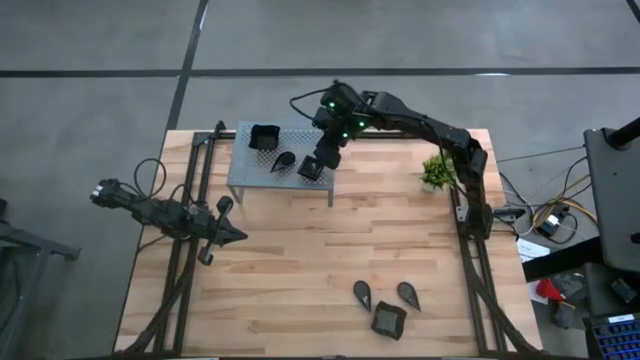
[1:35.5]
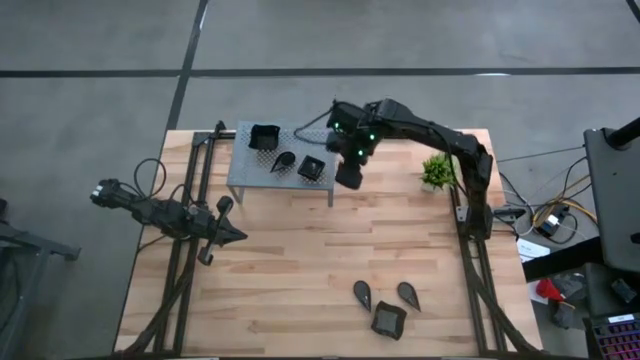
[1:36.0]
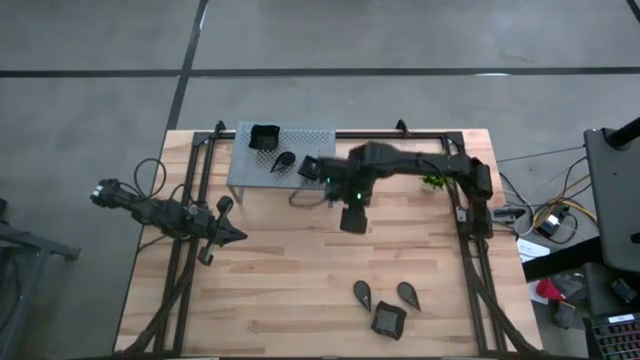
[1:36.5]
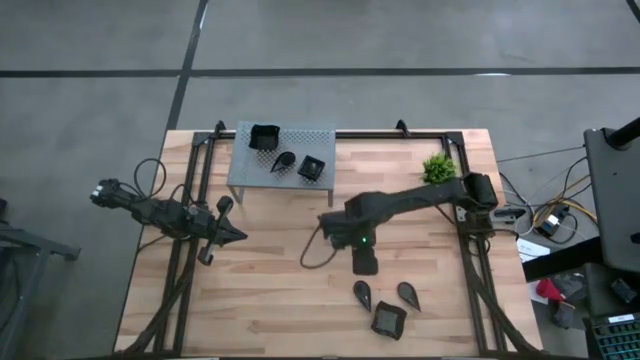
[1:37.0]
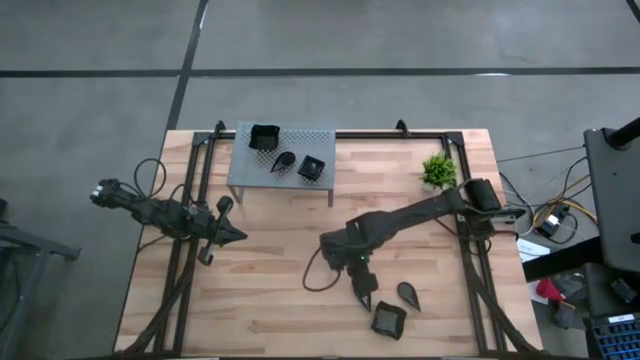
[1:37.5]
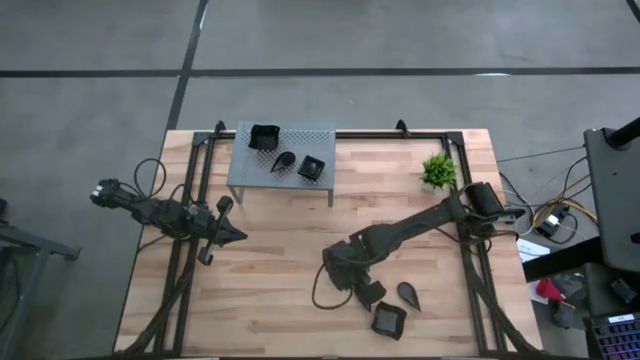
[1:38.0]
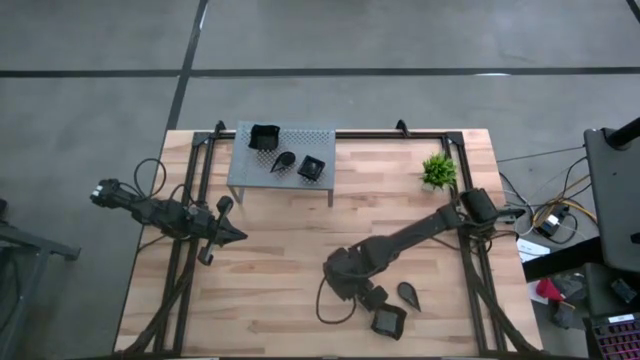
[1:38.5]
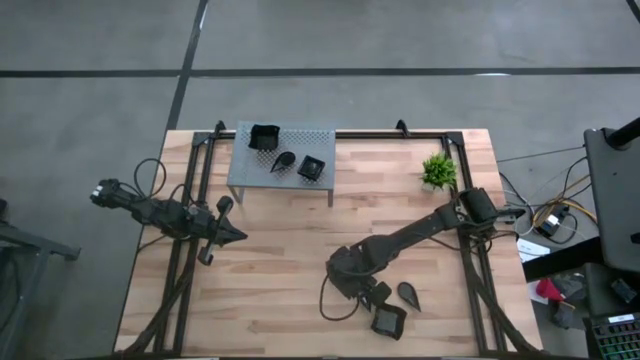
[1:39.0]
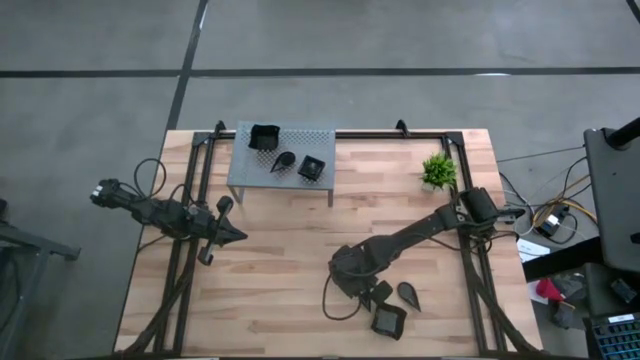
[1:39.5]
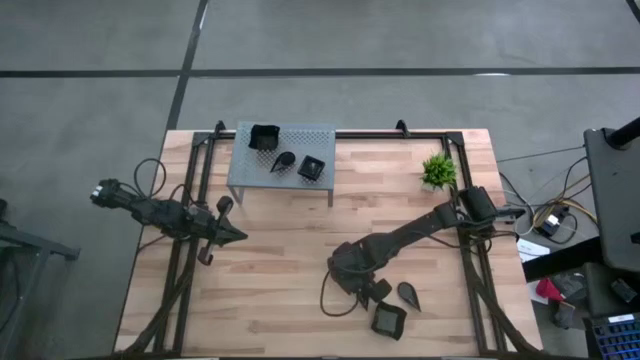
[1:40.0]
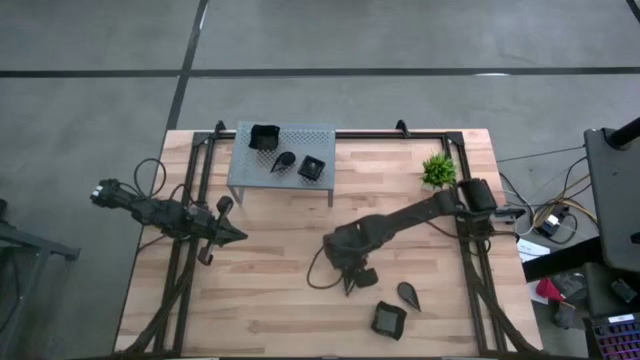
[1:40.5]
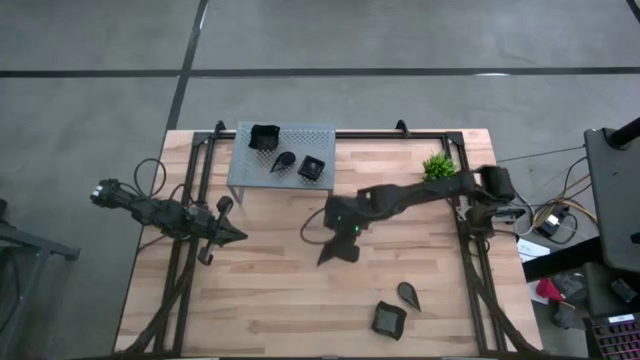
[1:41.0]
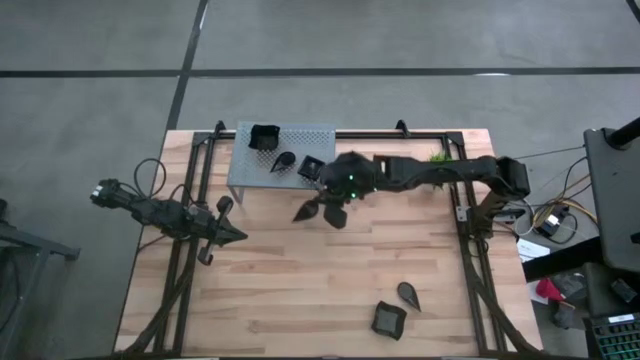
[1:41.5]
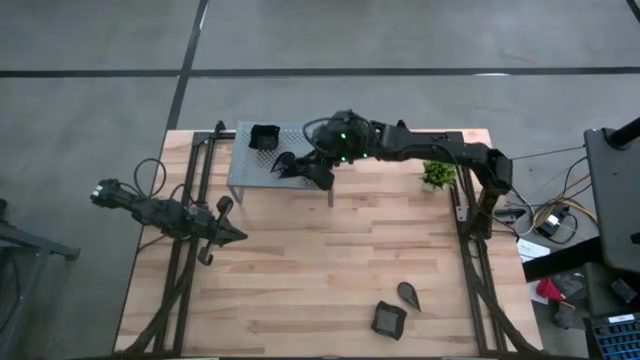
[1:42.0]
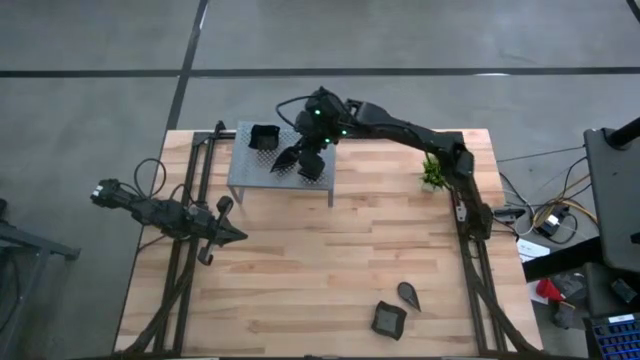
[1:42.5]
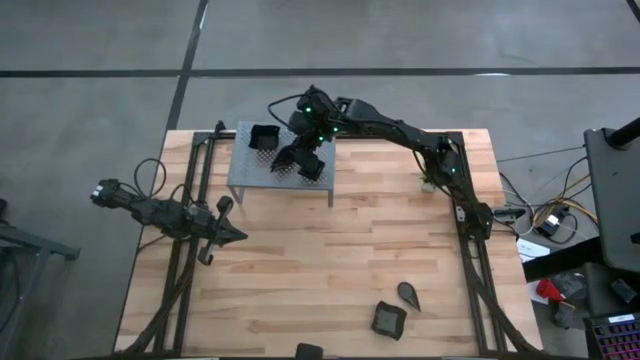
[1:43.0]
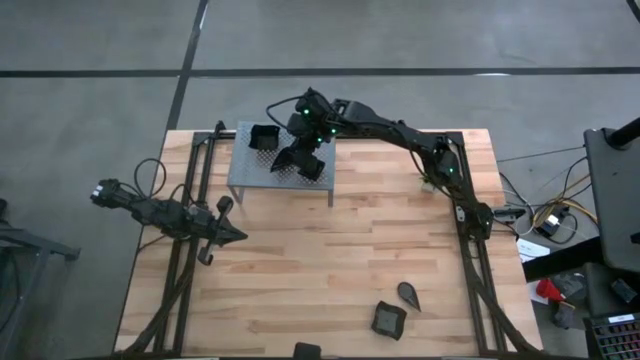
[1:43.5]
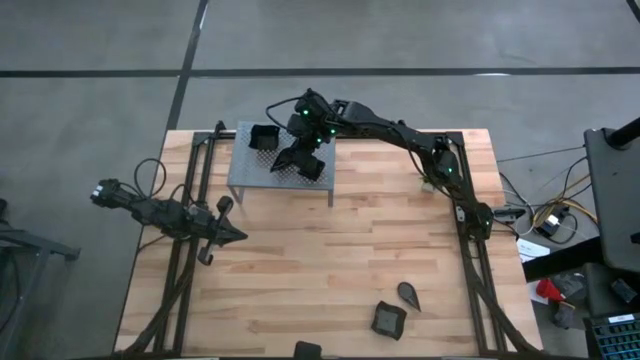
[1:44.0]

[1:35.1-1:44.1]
Task: Pick & Place Mini shaped plates
Stack the black leaf-shaped plate on top of the black leaf-shaped plate on the shelf

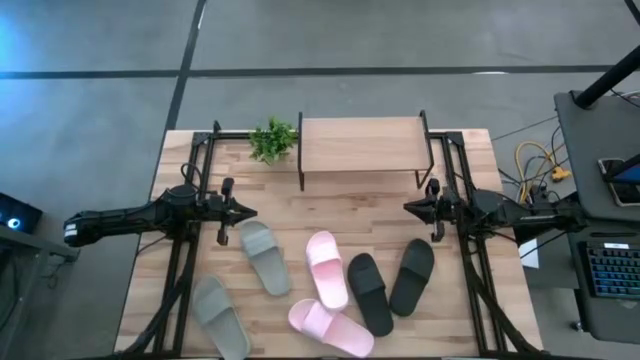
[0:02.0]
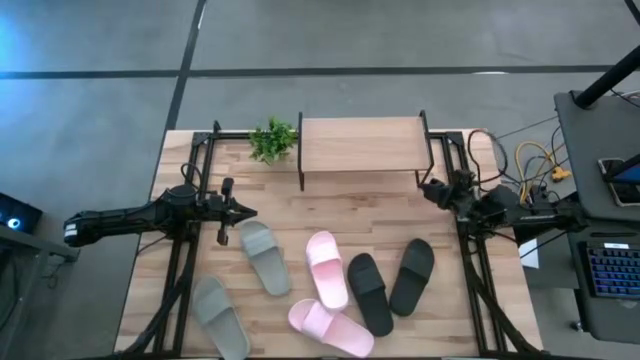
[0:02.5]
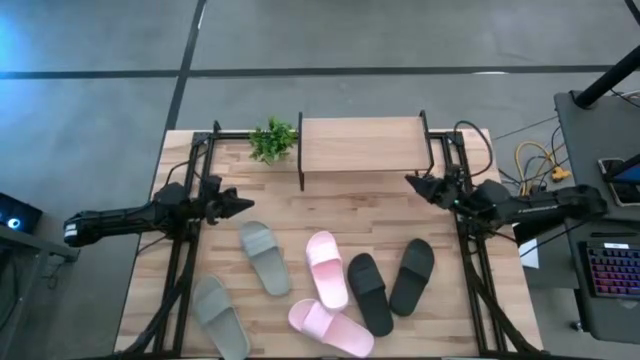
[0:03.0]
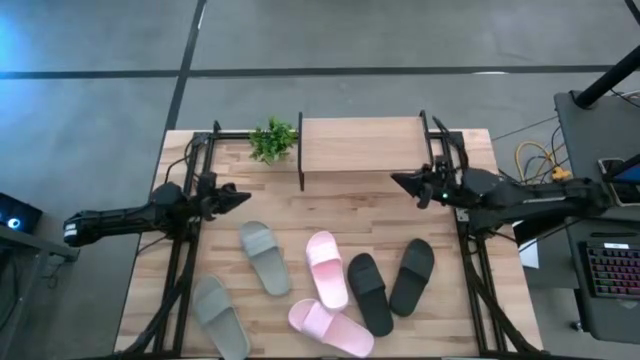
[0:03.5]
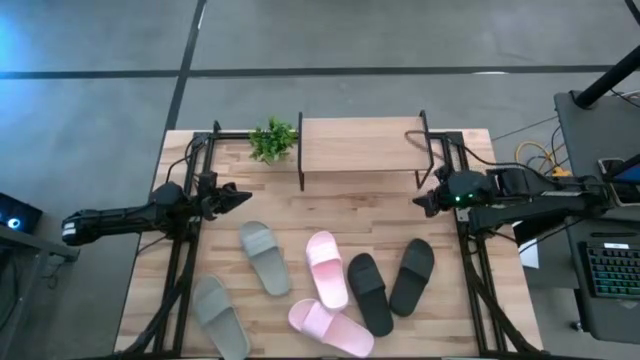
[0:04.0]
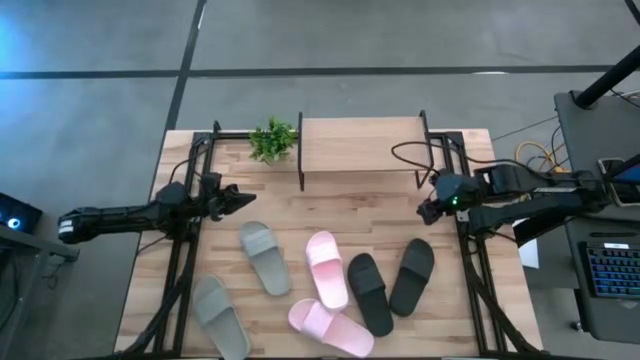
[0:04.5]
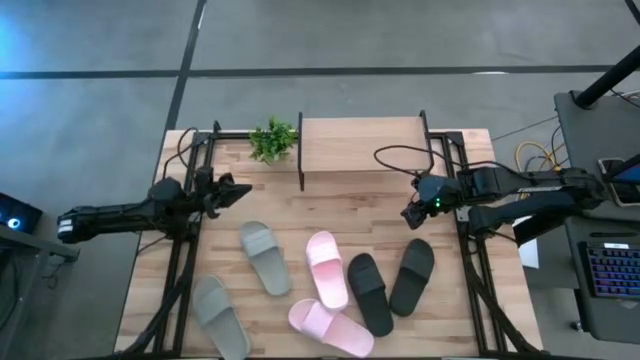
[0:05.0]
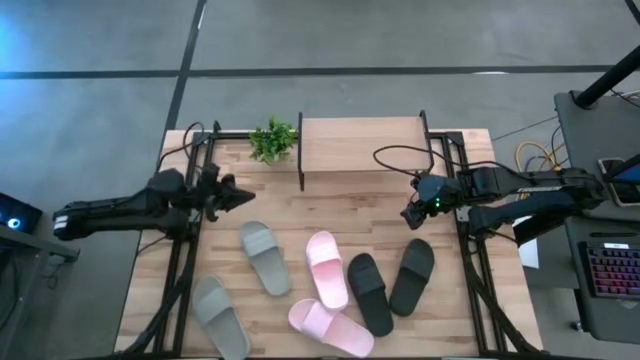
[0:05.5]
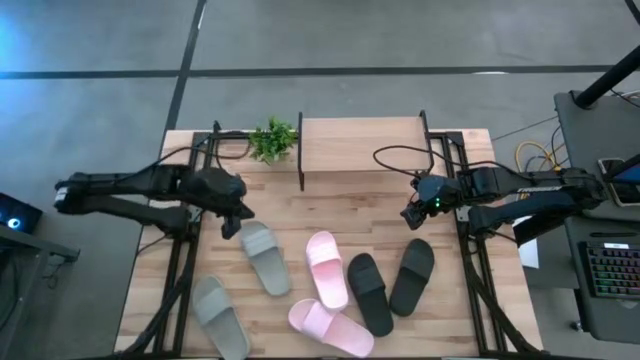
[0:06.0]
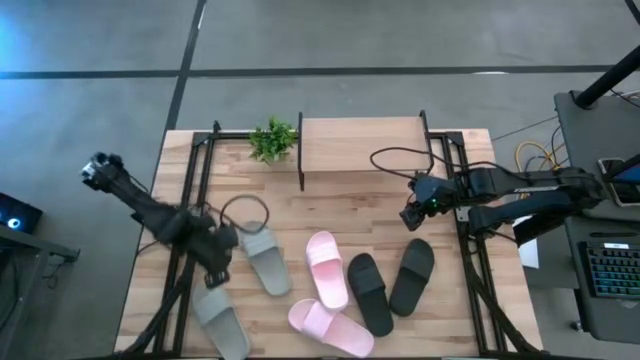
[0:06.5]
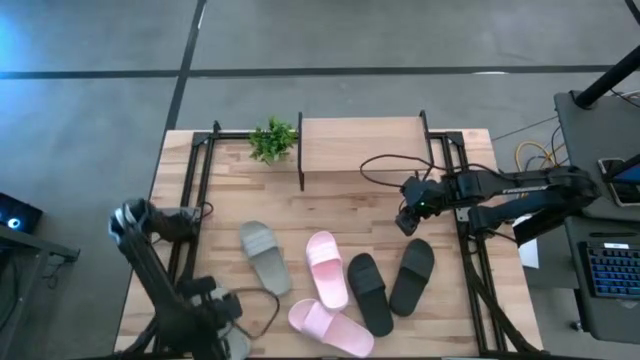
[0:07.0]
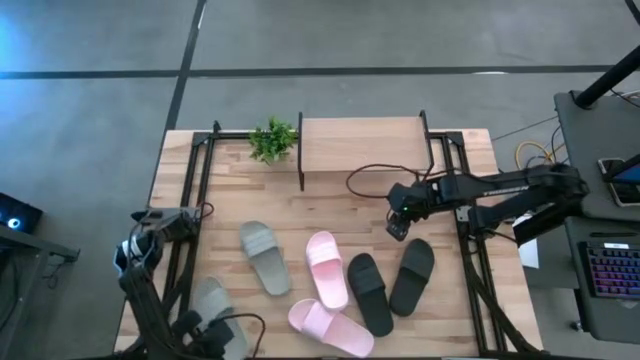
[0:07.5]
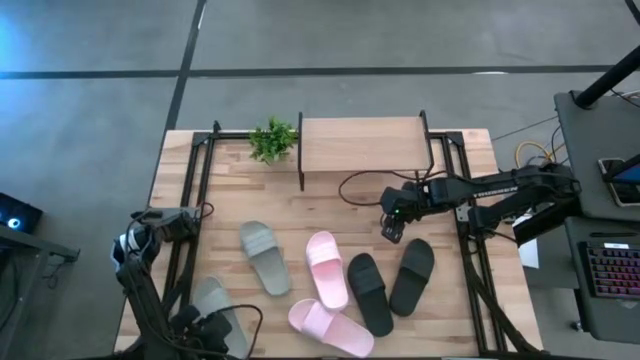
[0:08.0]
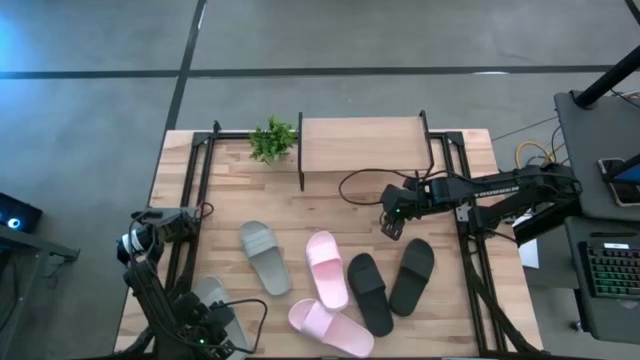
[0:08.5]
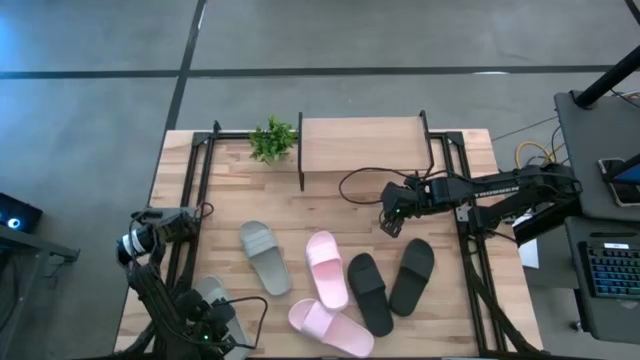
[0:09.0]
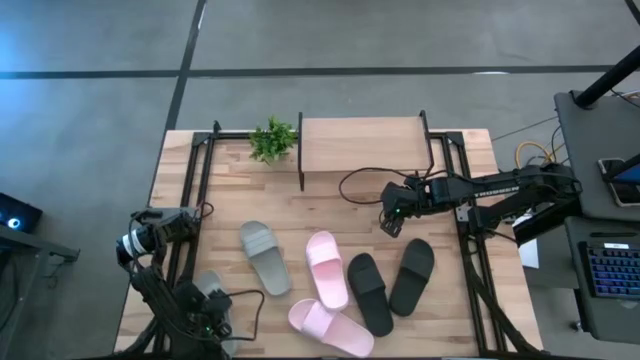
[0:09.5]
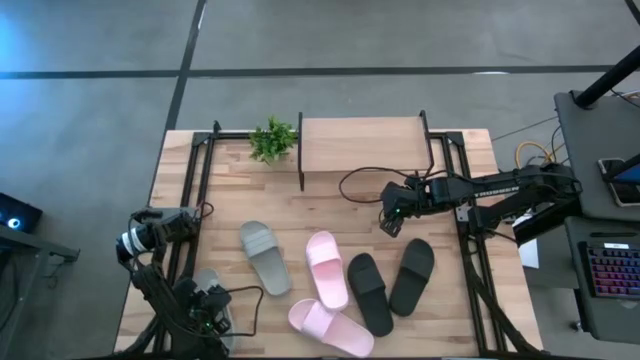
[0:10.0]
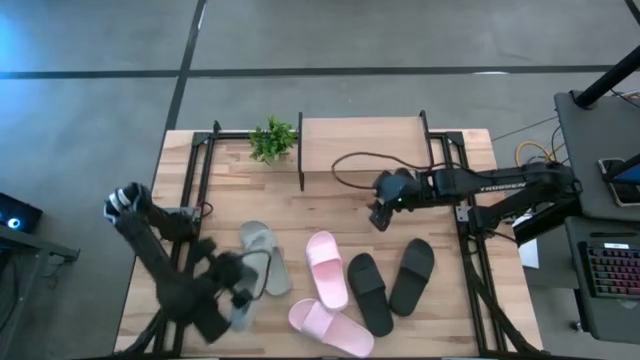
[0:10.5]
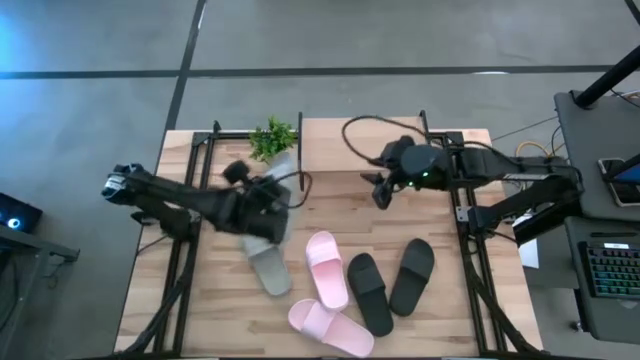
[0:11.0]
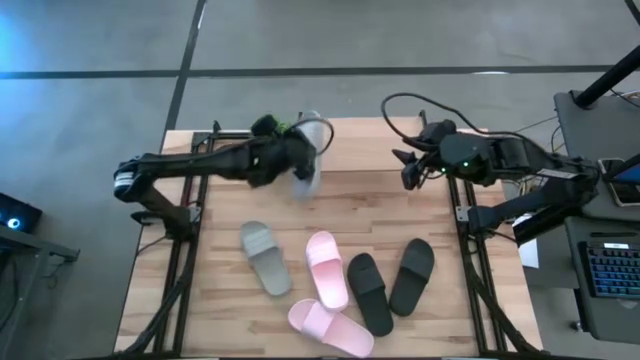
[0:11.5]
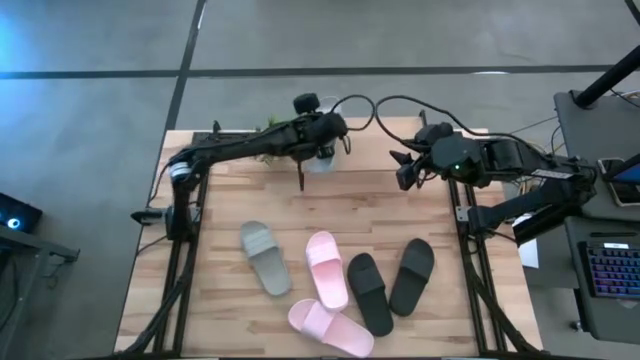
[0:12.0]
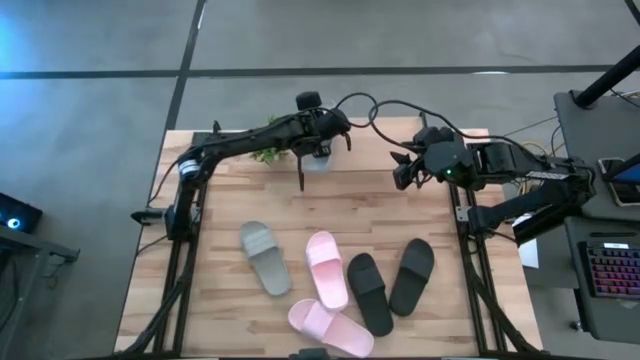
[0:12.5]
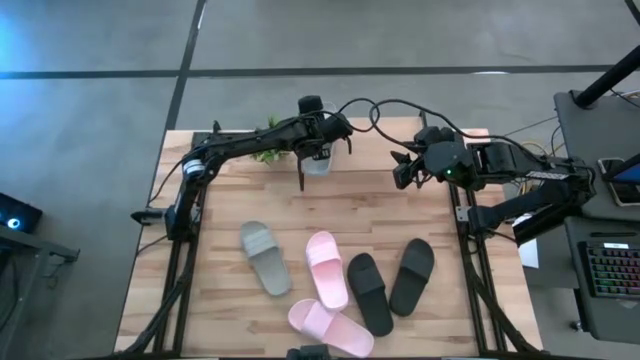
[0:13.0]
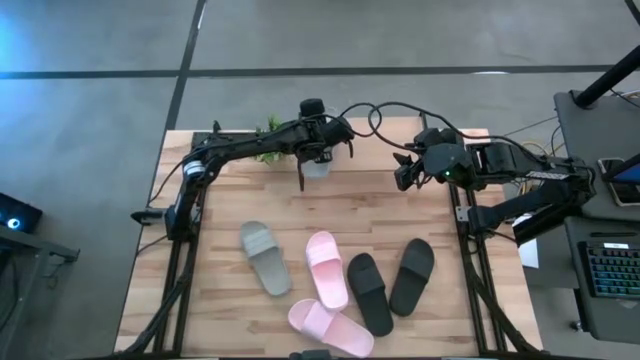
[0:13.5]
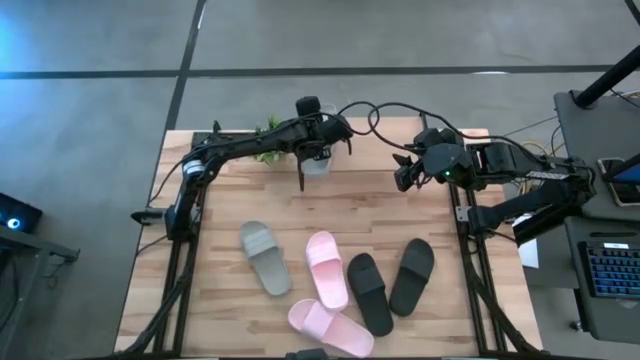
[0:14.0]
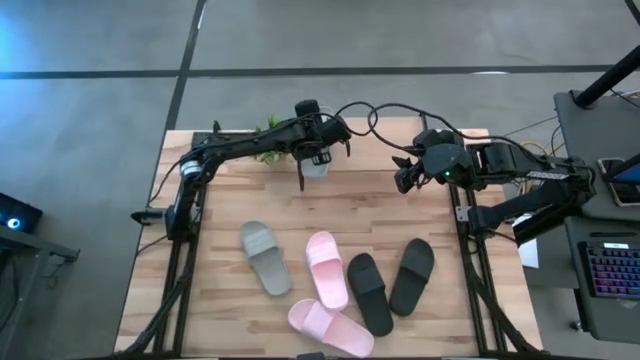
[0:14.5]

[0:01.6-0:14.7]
Task: Pick and place slides into the shelf
Put the bottom gray slides on the shelf
